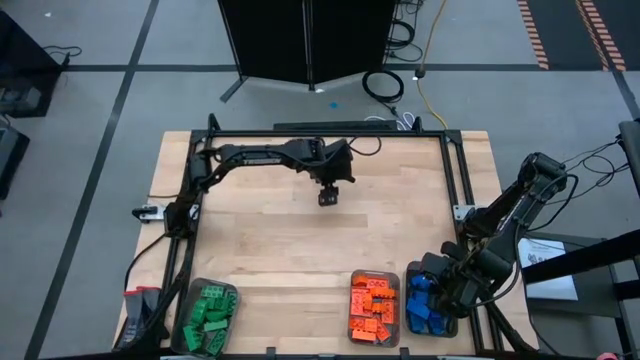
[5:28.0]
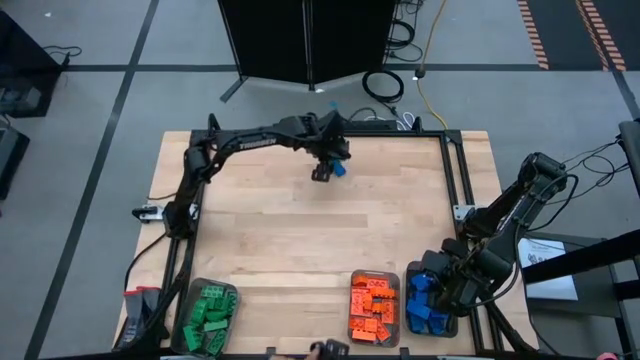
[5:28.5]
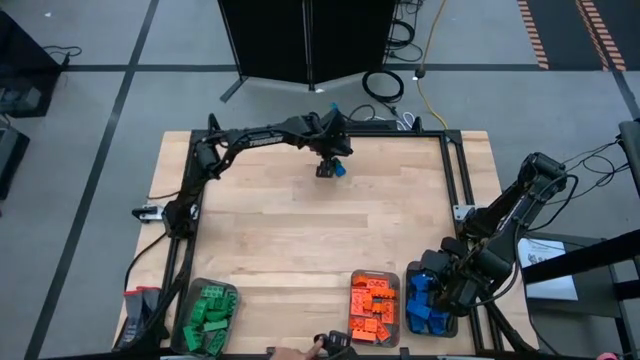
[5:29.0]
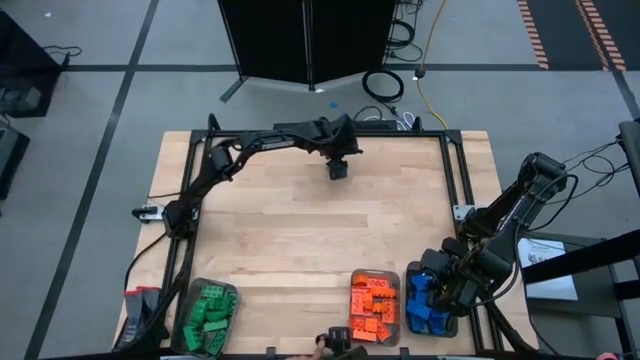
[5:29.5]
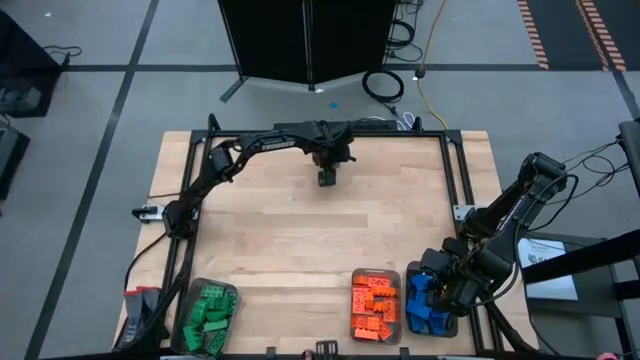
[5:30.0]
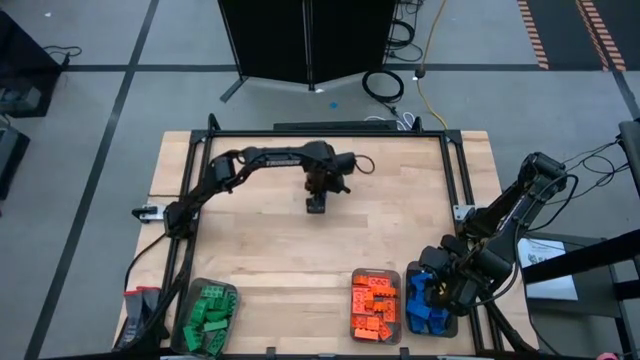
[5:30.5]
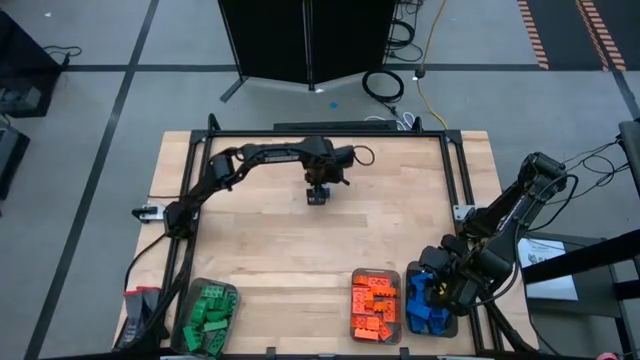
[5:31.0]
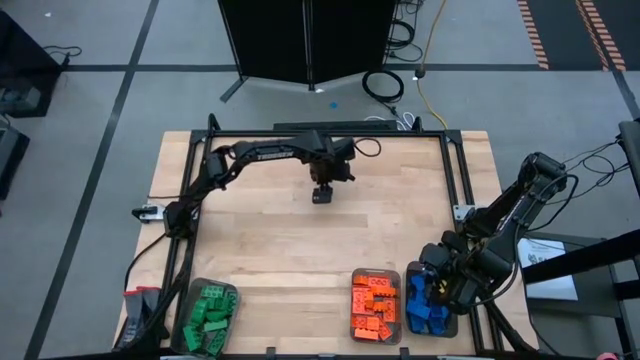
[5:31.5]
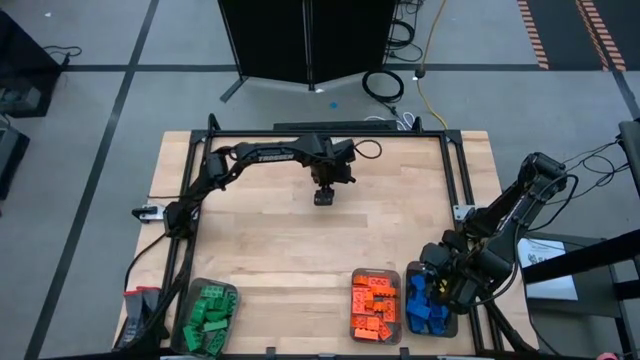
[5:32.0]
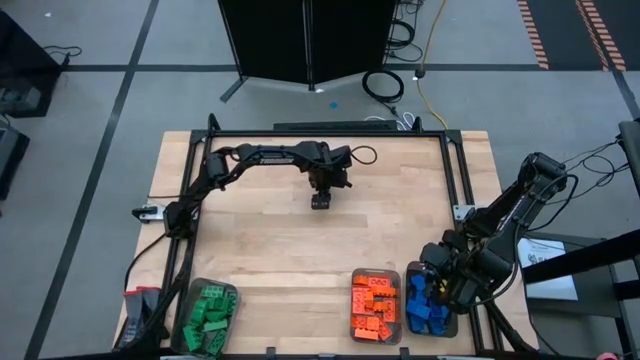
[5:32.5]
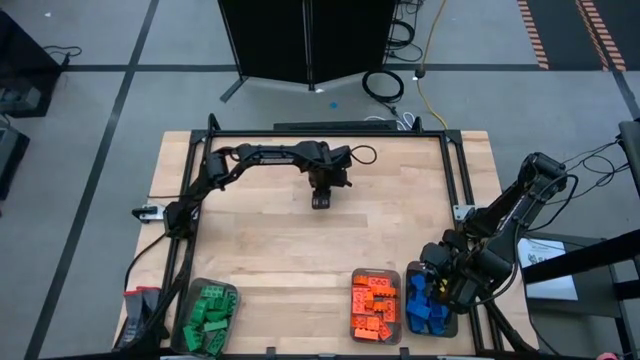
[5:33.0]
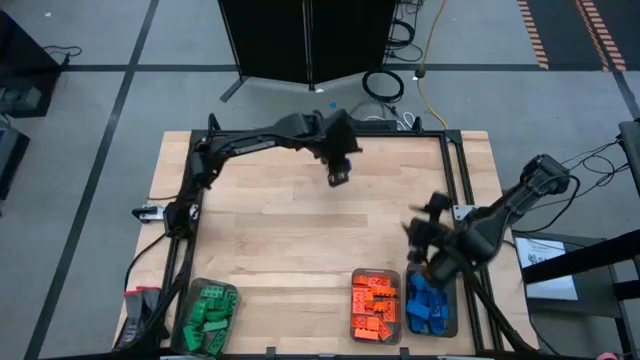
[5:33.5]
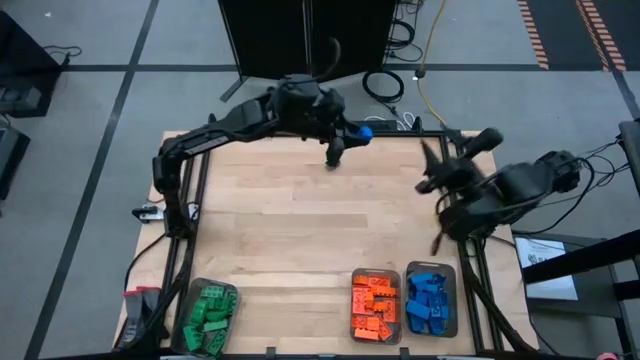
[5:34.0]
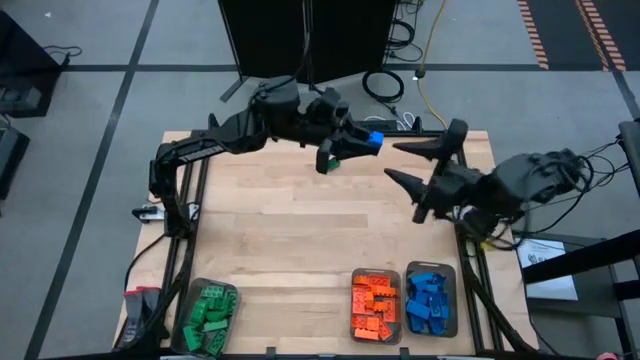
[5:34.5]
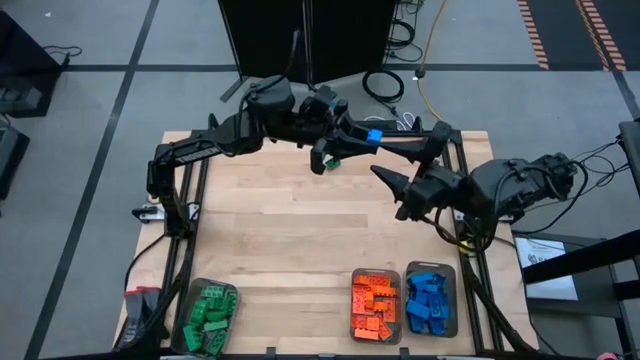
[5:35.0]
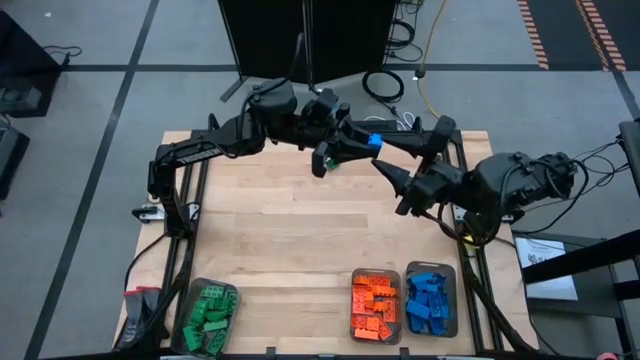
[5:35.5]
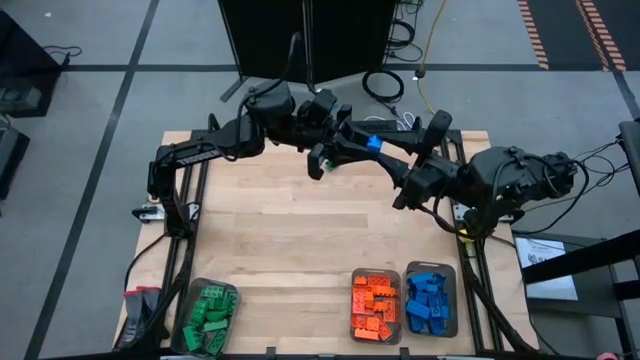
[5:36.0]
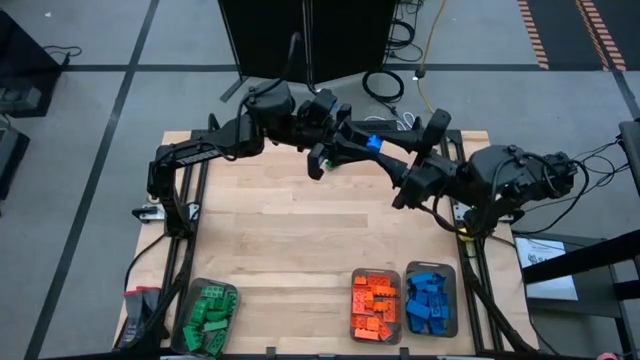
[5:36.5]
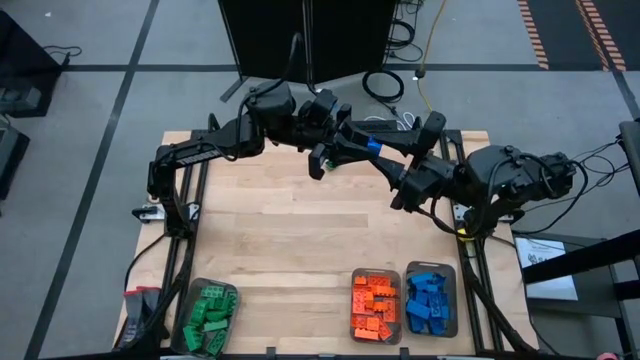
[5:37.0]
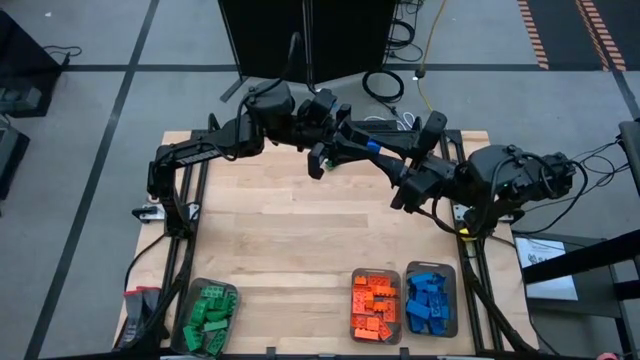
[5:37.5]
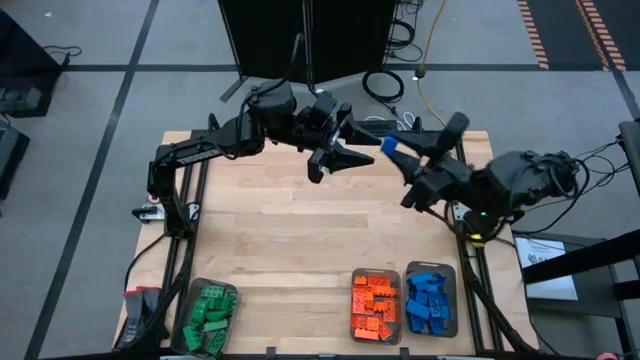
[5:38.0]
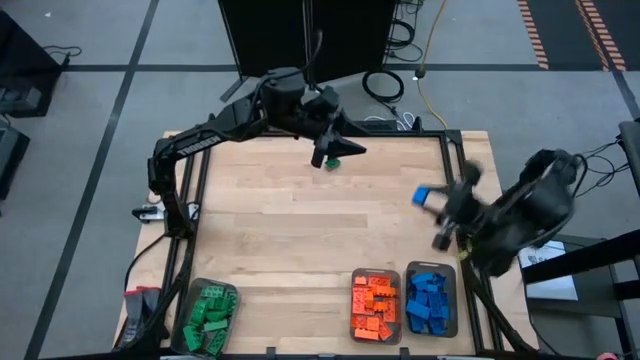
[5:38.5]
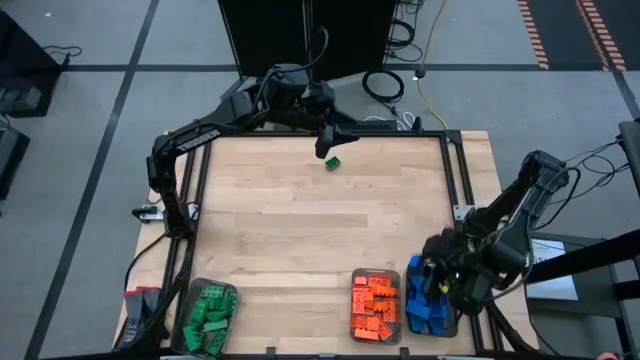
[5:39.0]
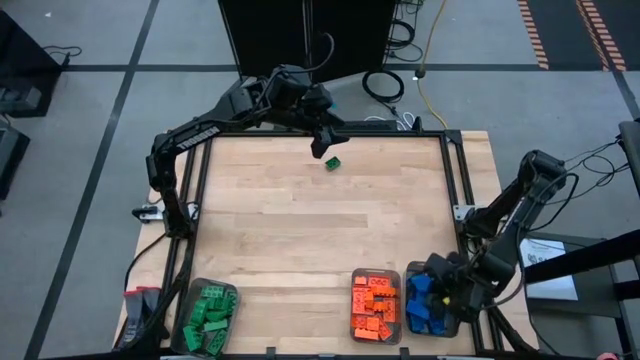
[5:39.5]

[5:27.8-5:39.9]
Task: Sort blocks
Put the blue game piece into the right black bin

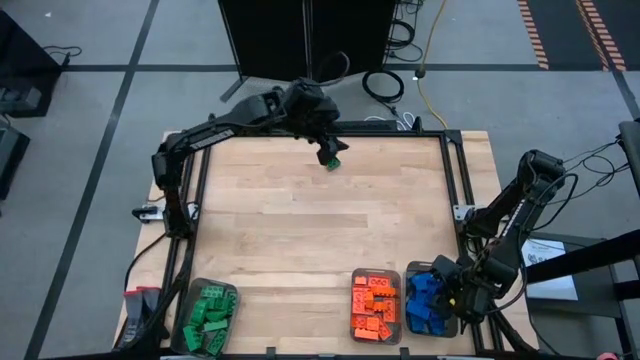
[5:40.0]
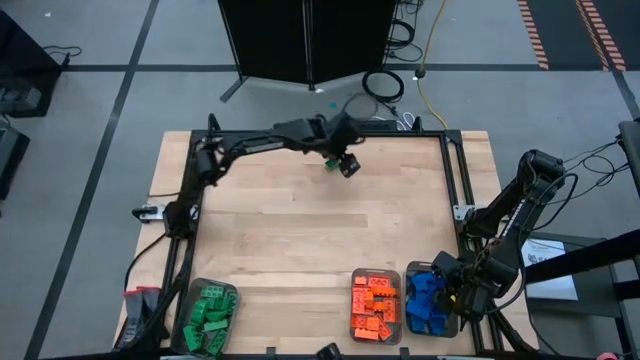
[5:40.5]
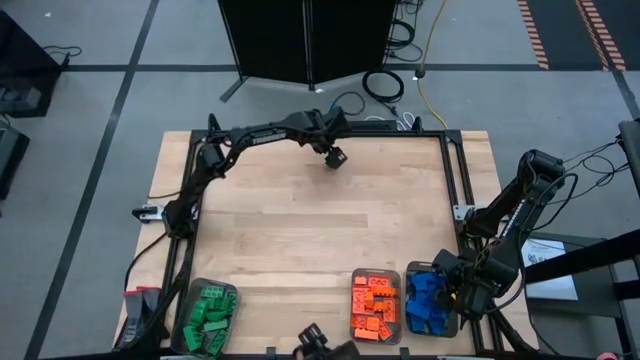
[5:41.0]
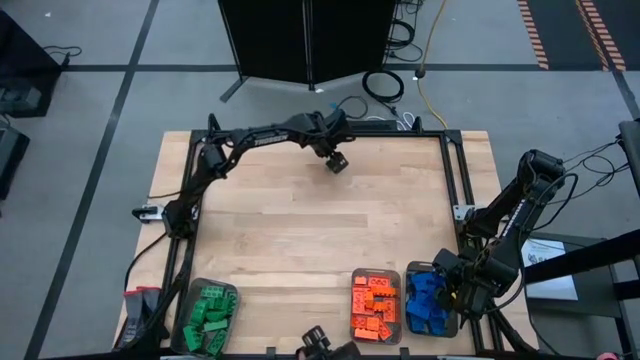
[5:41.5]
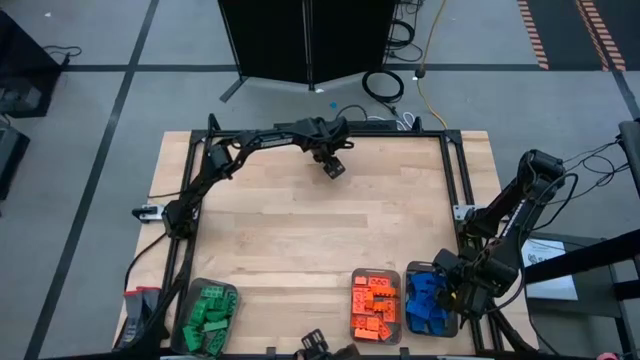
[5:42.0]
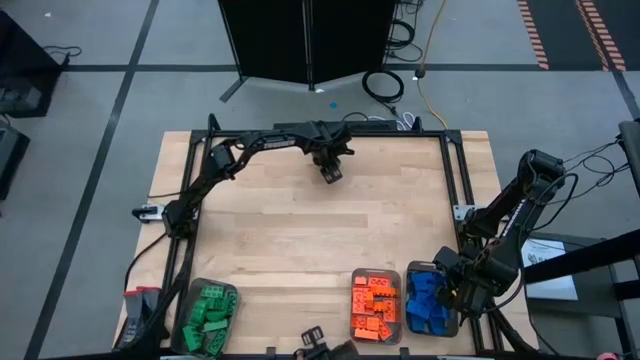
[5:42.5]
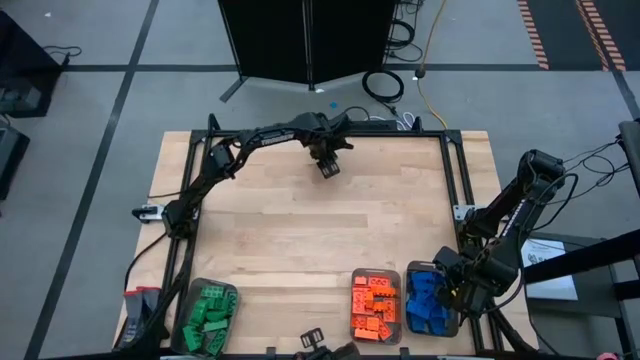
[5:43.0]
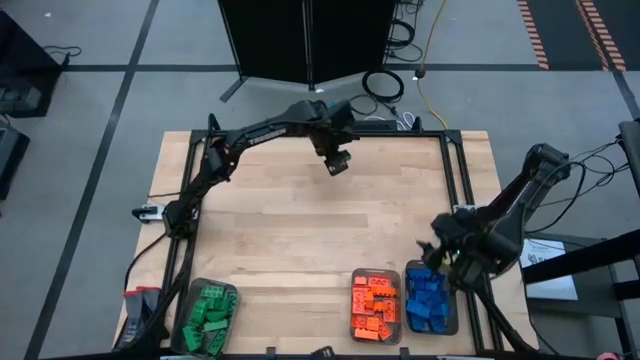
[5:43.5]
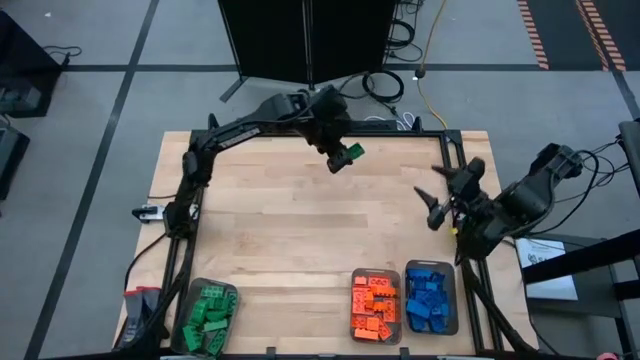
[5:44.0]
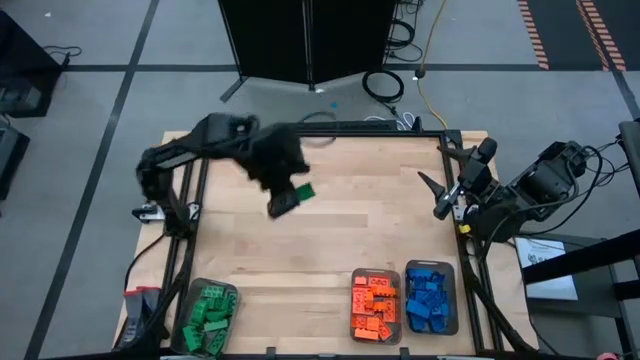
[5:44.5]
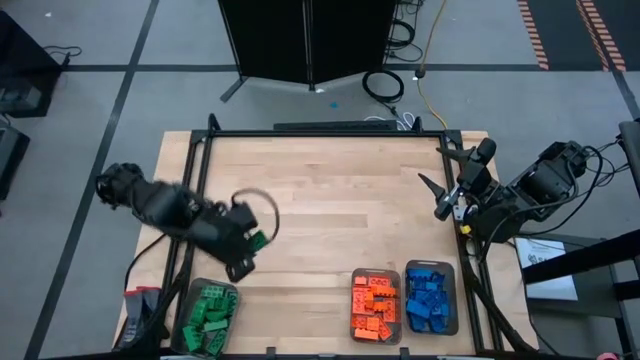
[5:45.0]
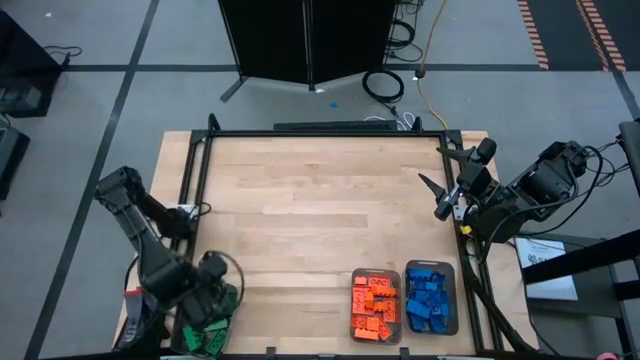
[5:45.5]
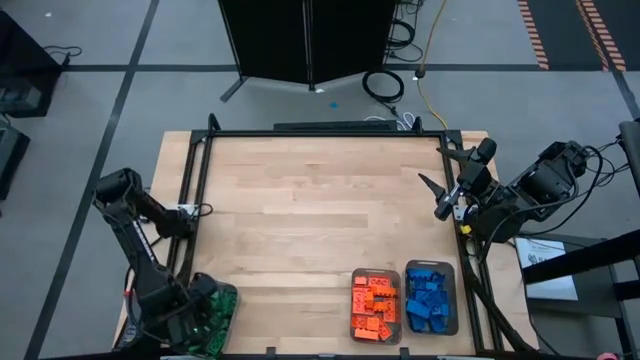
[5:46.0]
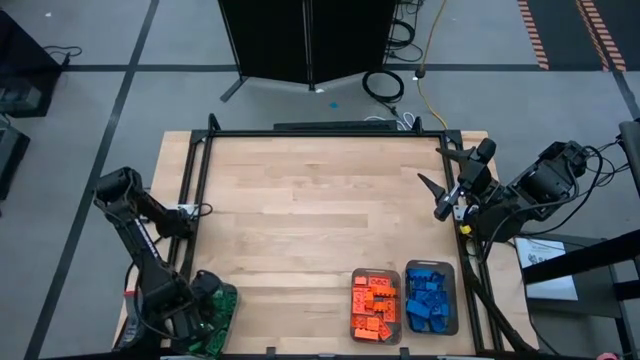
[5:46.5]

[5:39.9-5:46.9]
Put the green game piece into the left black bin
